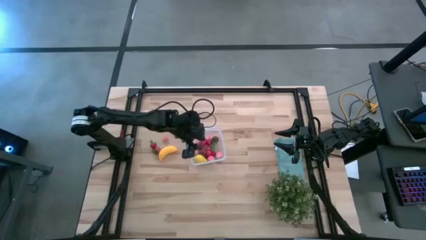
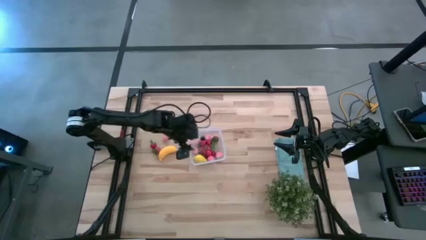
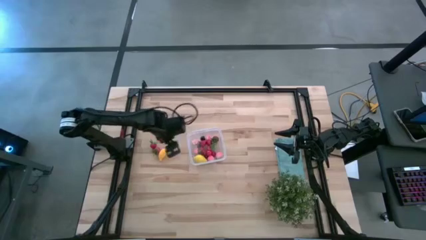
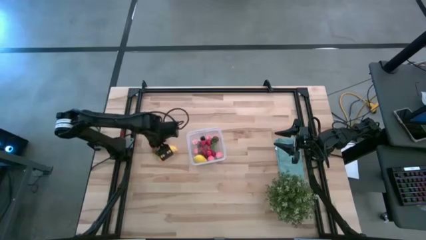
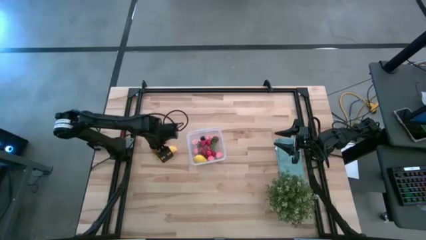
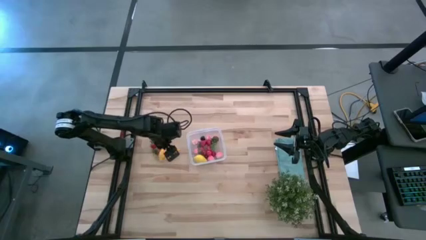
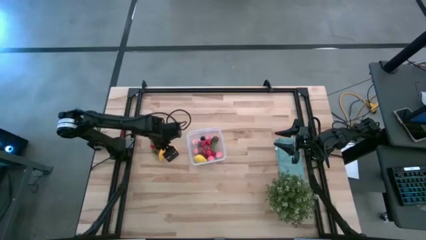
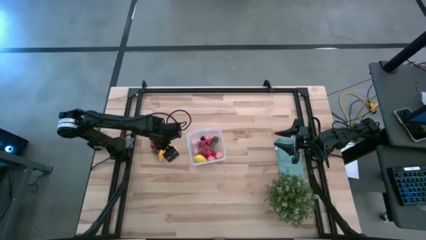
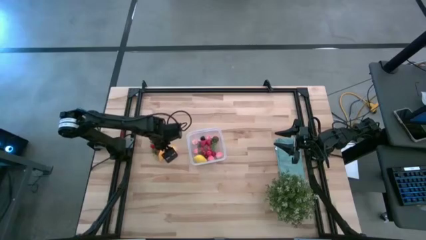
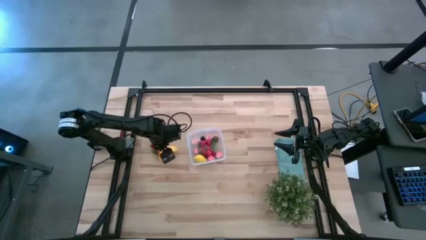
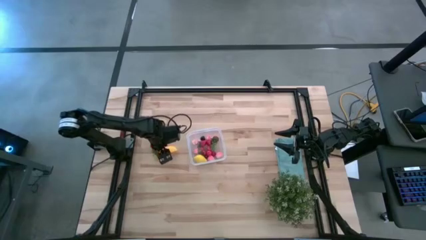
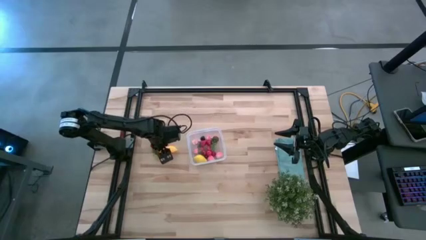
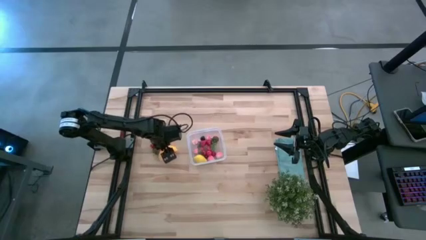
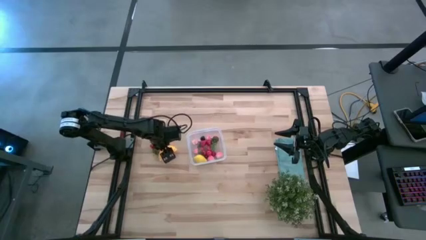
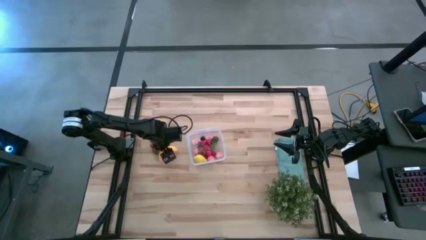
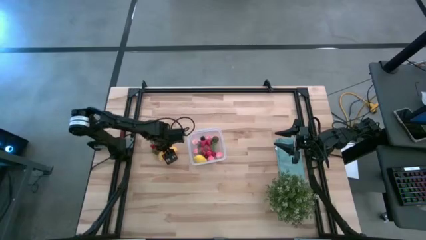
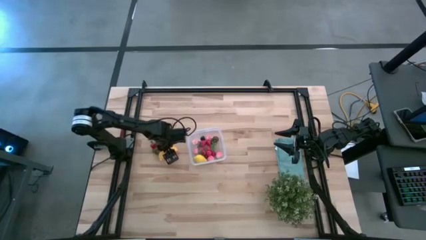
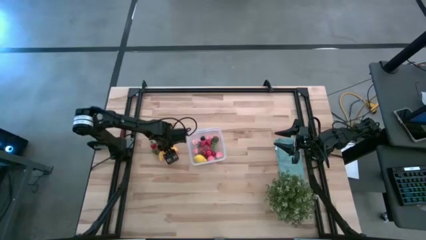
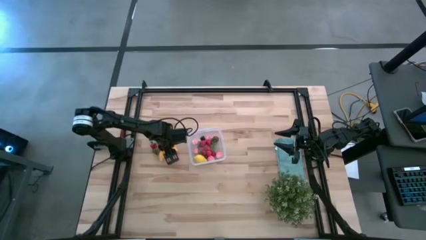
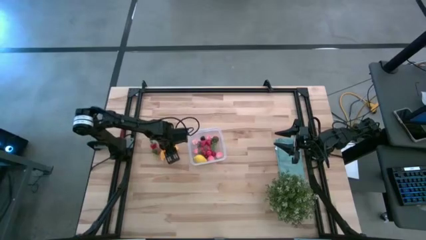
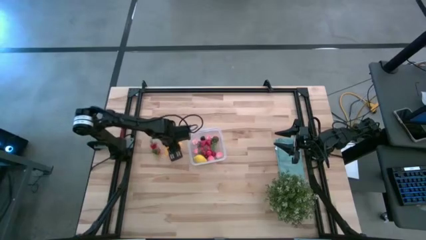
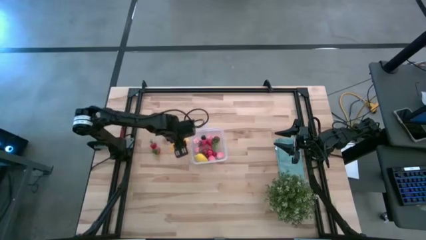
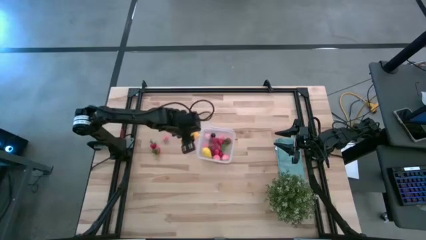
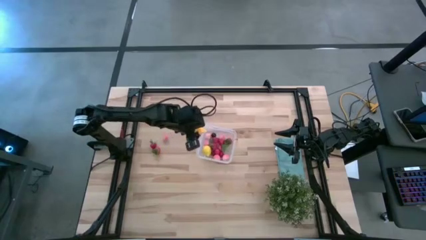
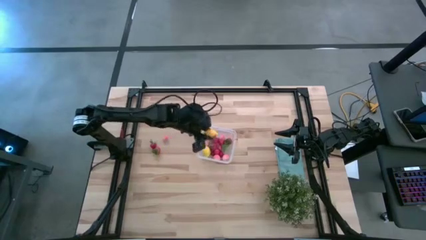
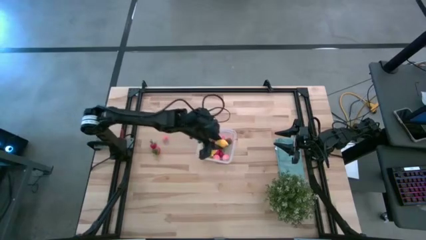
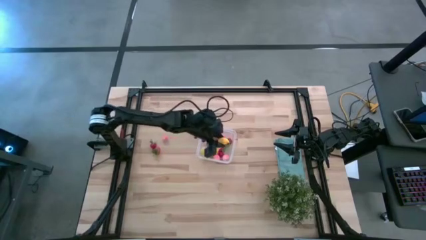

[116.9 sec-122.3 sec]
Task: Pick and placing Produce into tupperware
Put the banana into the transparent bin

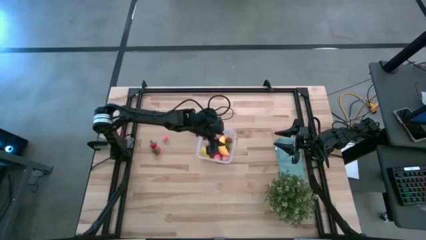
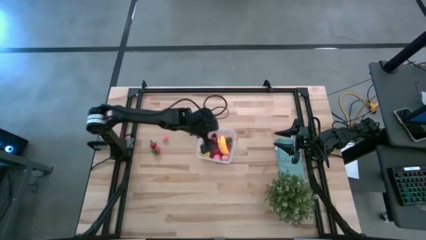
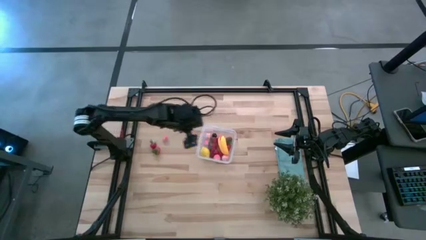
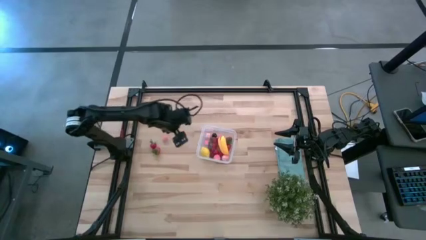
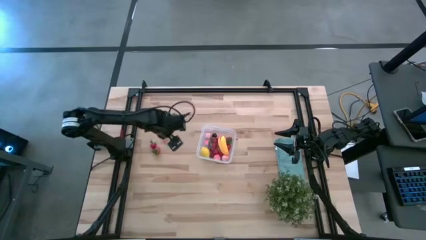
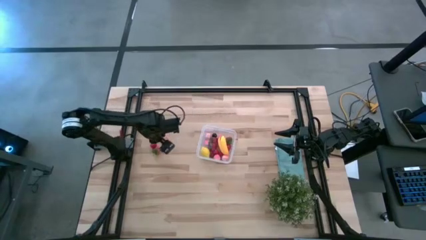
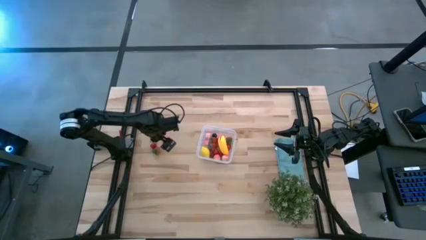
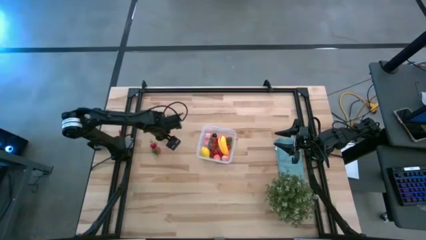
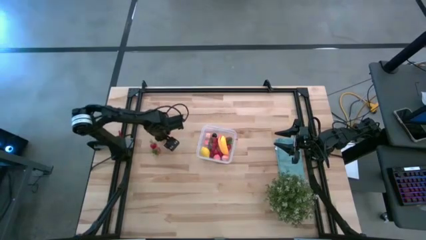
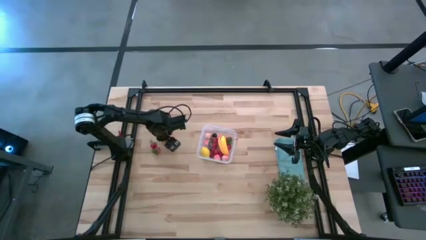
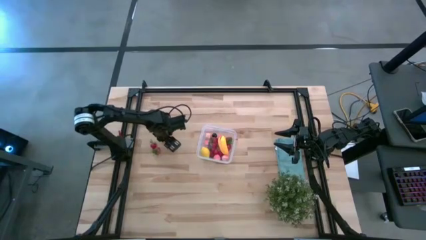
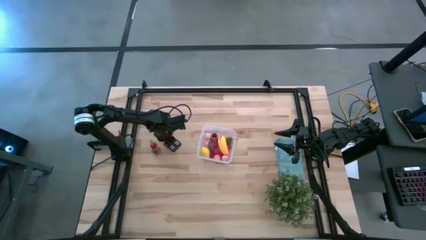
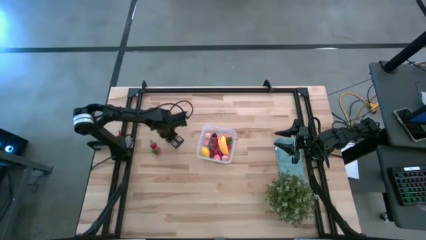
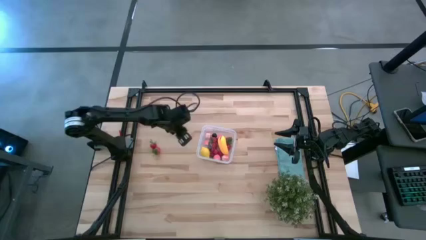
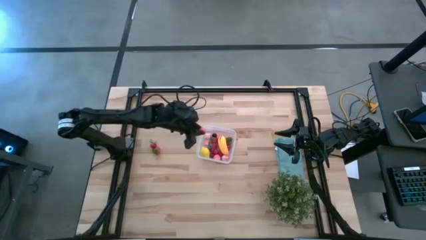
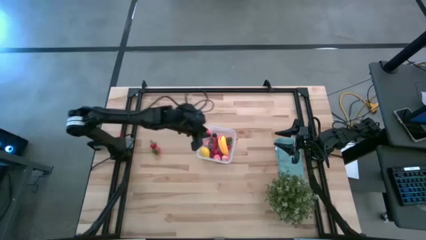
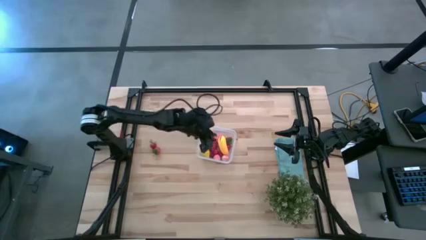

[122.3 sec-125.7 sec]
Put the peach into the transparent bin

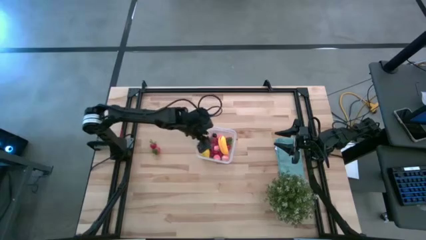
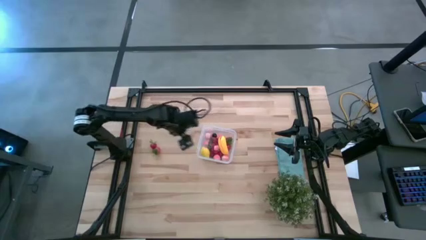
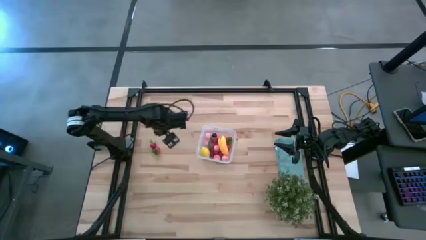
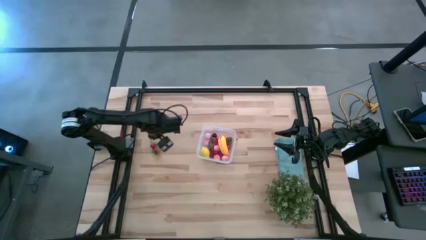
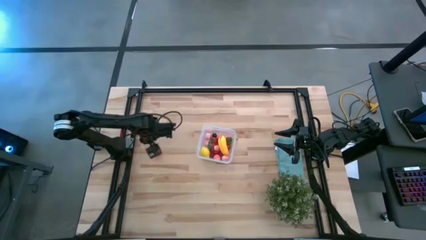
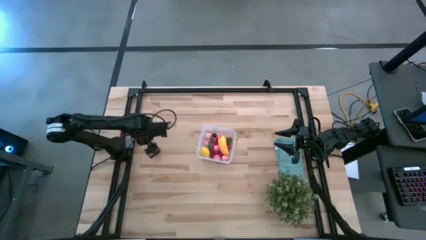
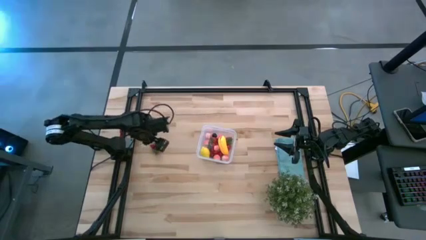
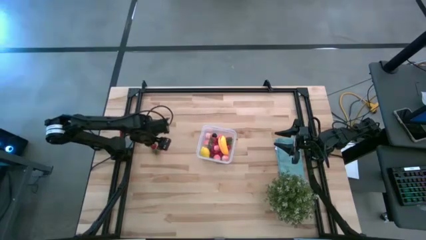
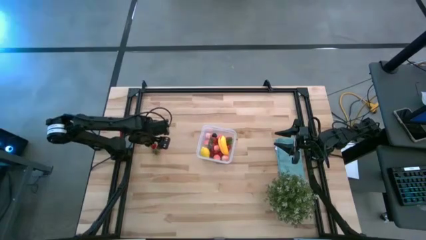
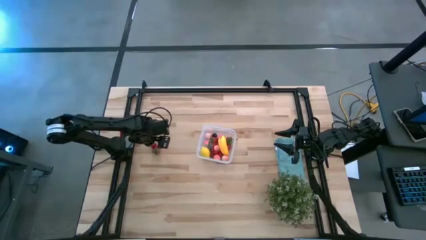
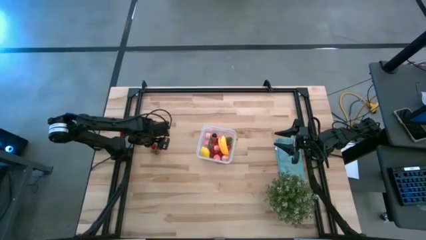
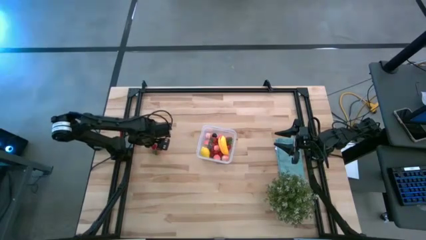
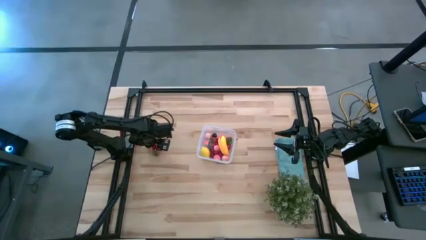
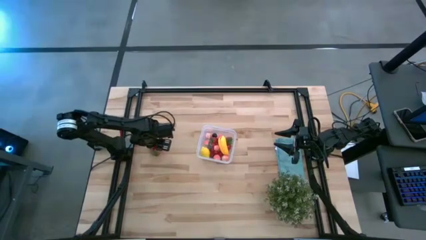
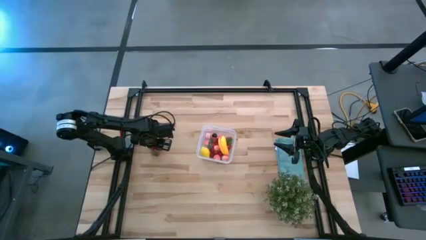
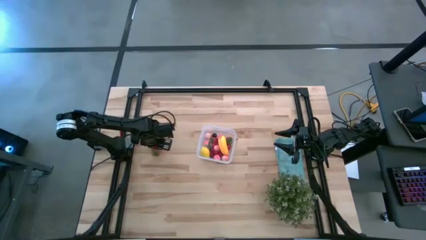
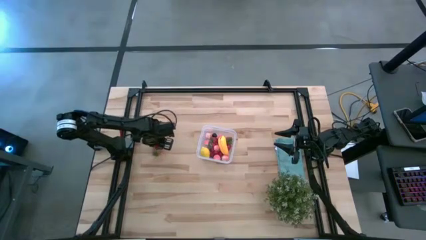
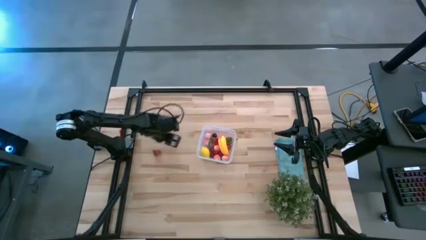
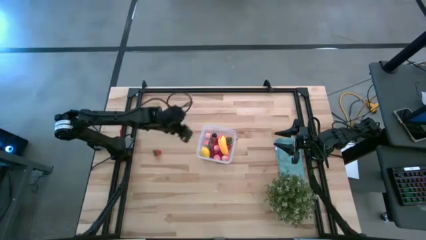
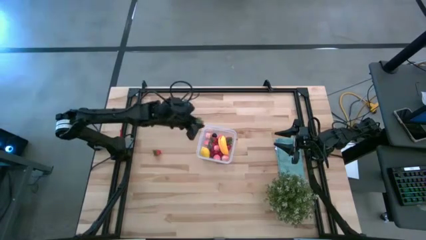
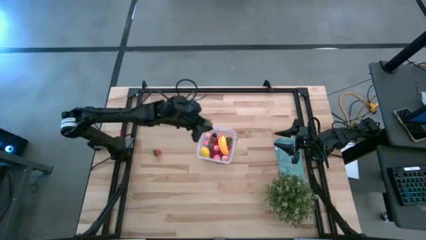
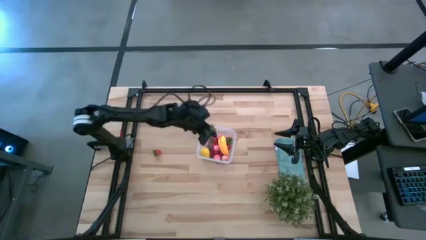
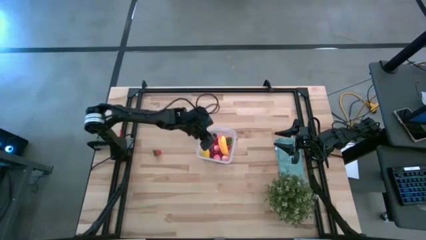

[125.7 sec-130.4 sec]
Put the strawberry into the transparent bin

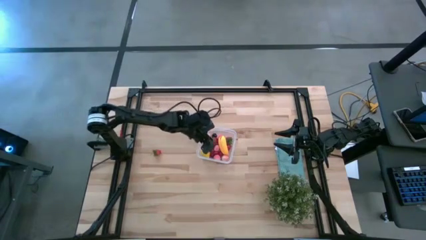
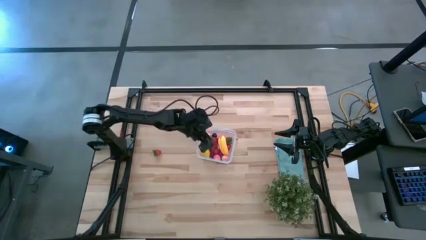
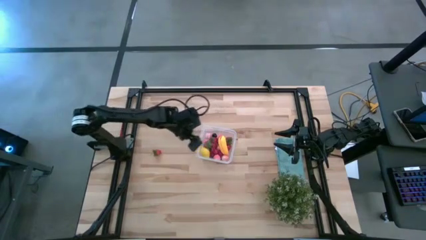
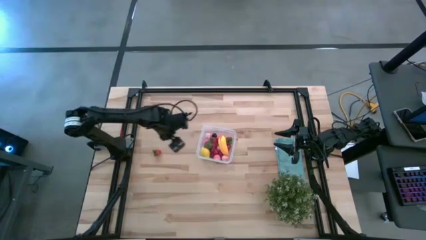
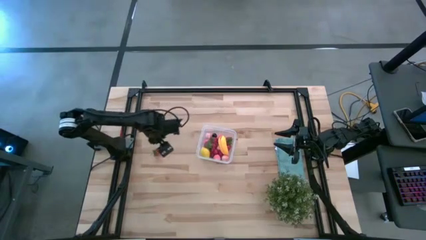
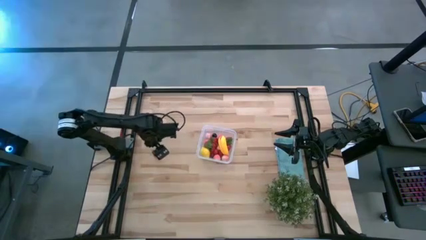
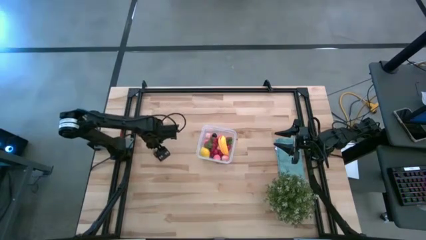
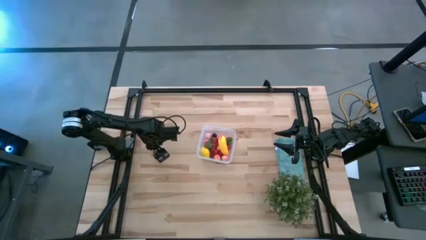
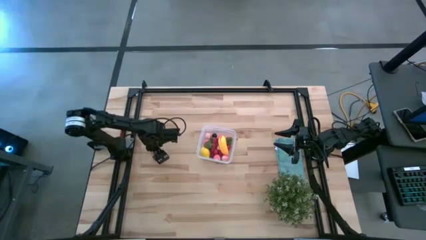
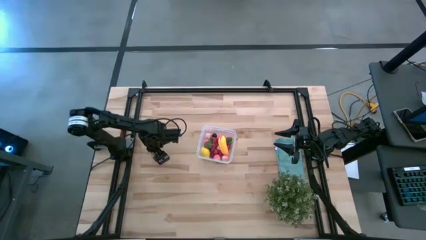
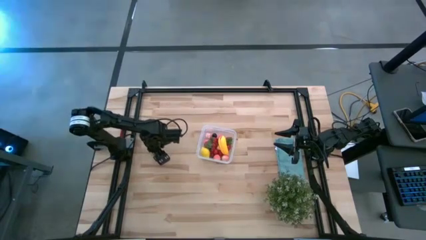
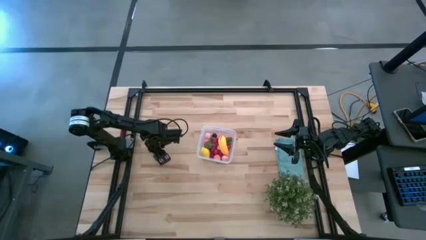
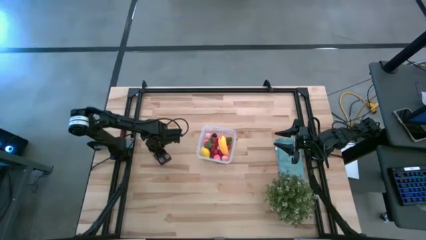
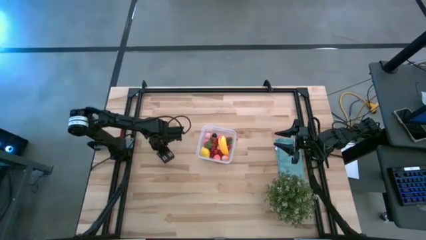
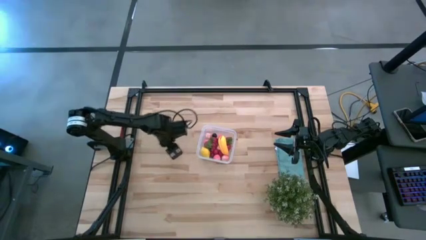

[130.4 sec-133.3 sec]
Put the strawberry into the transparent bin
